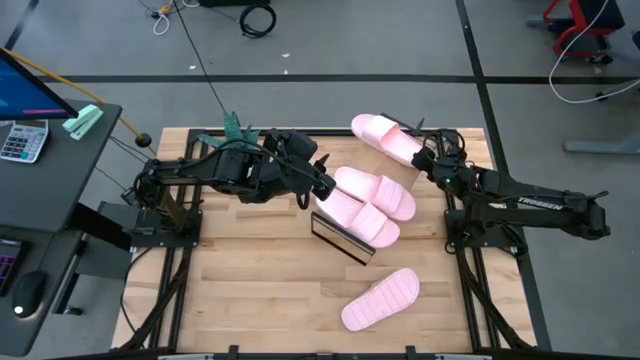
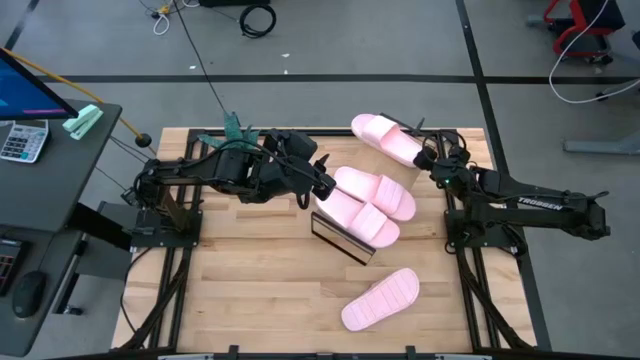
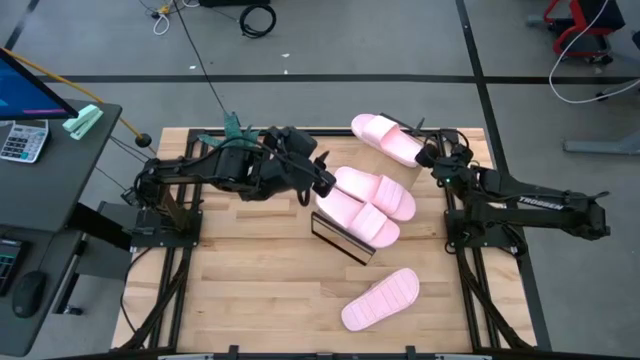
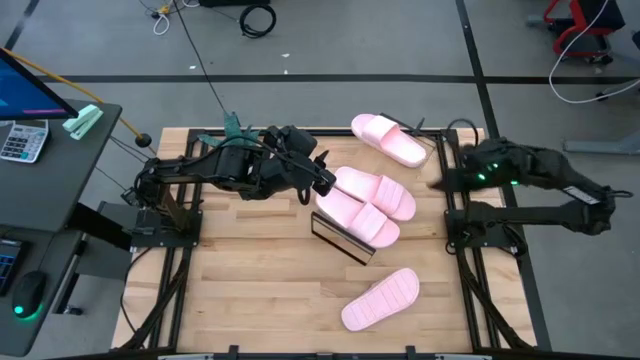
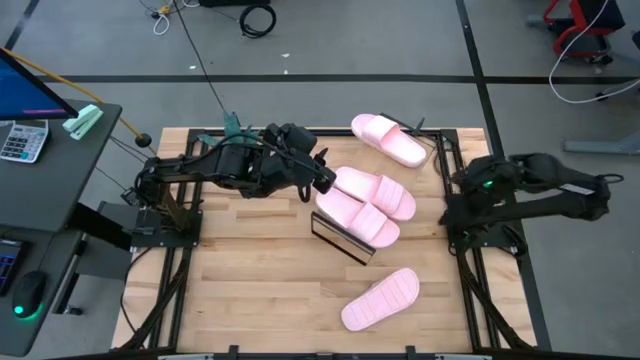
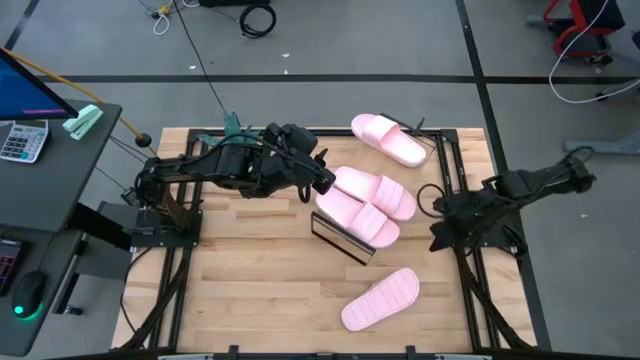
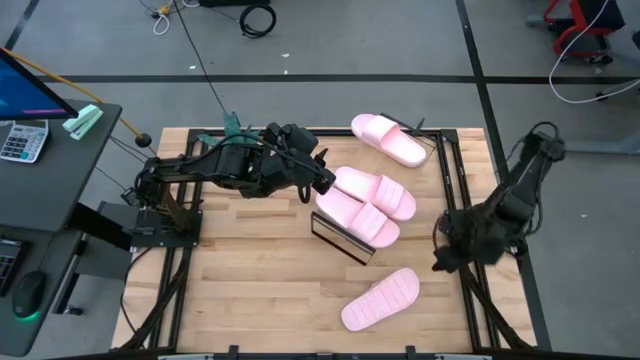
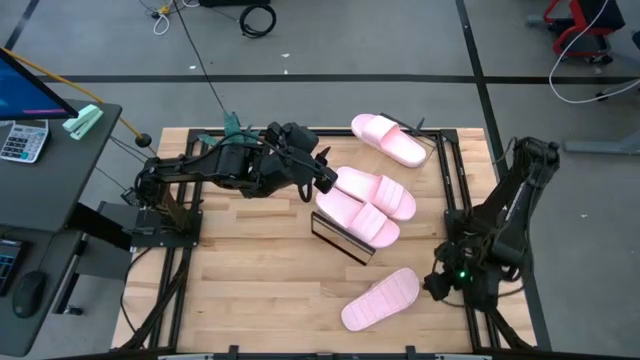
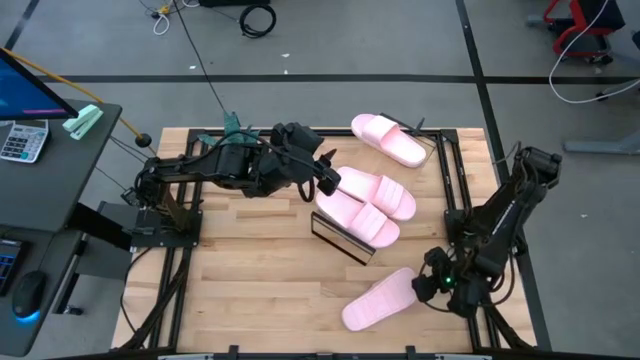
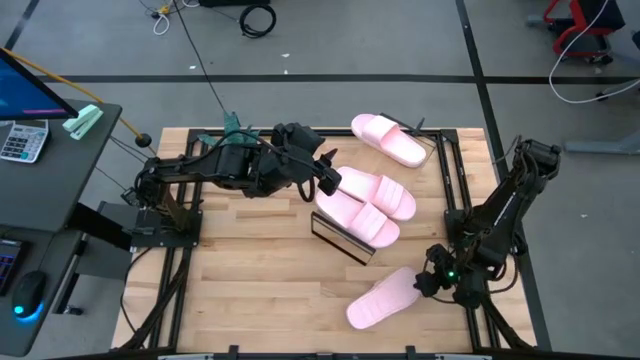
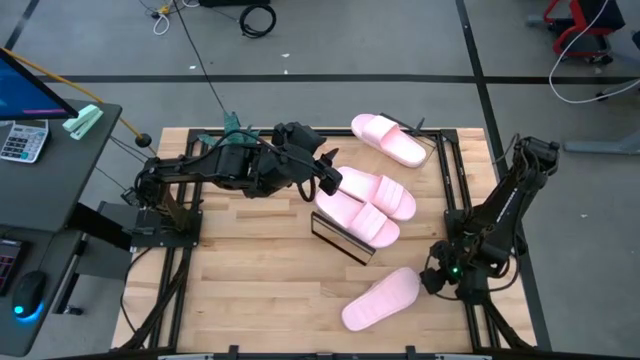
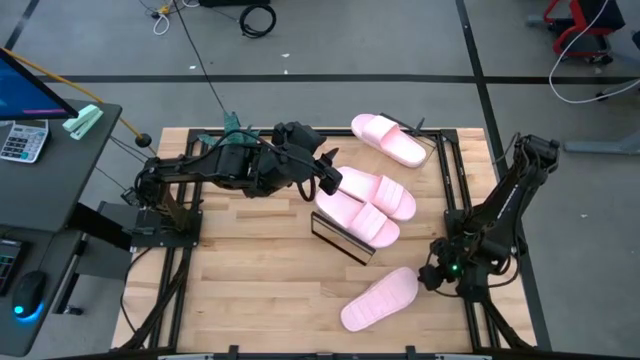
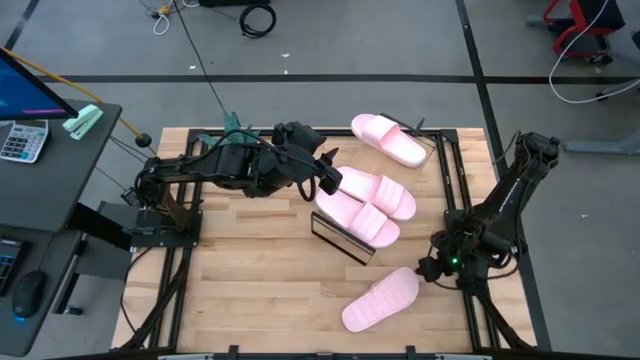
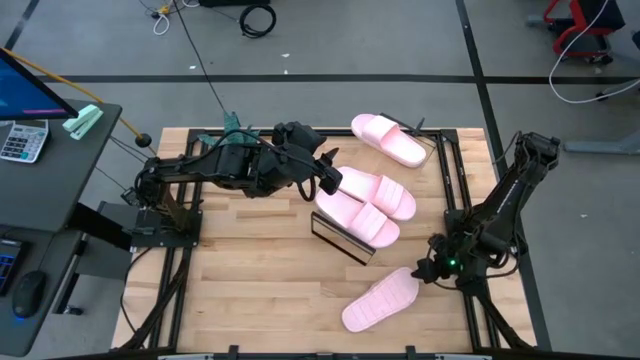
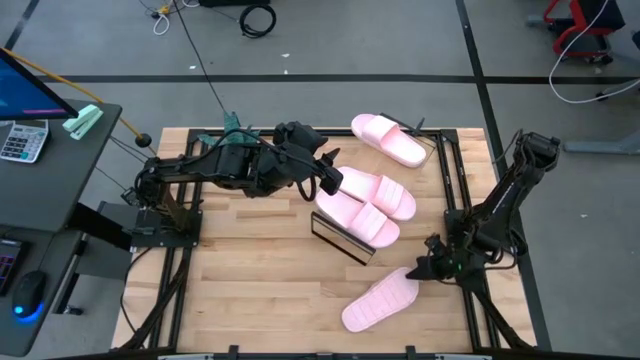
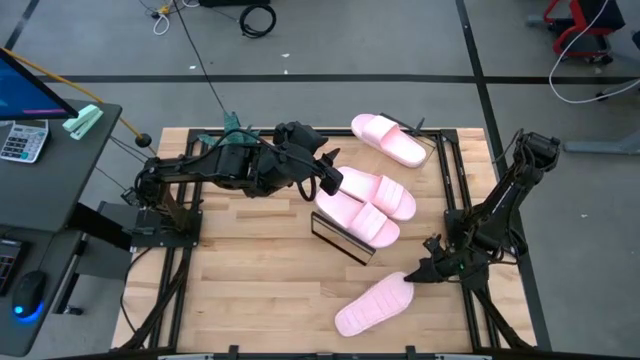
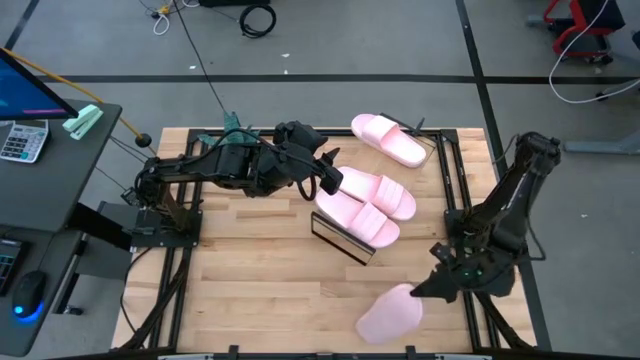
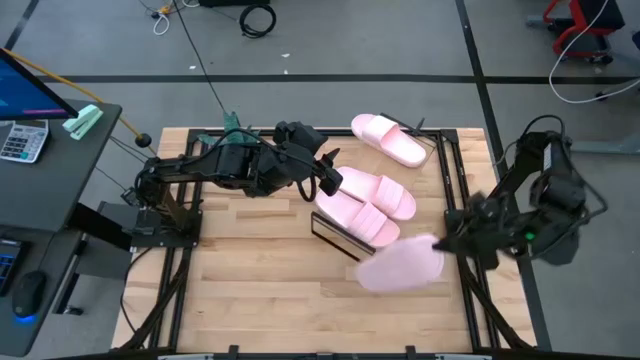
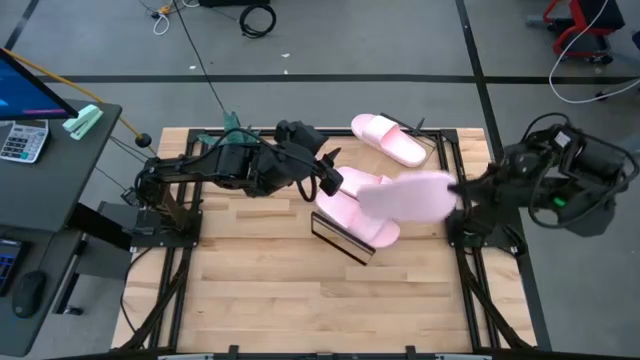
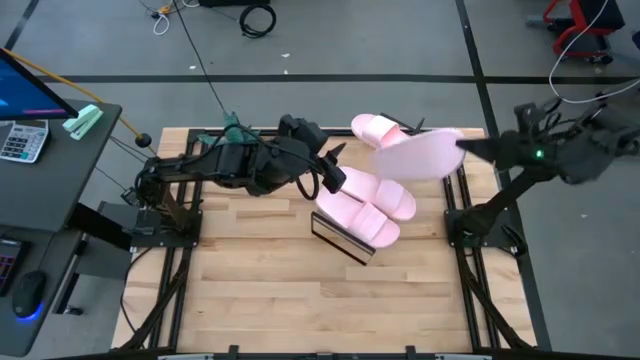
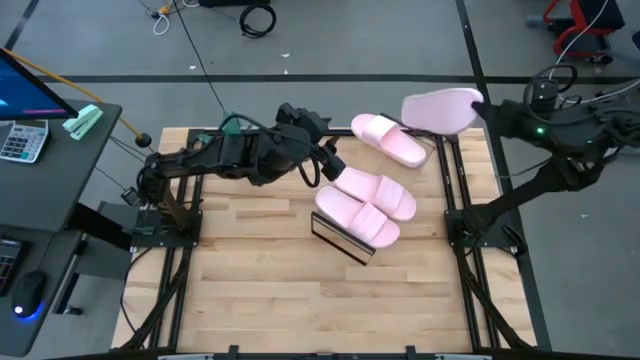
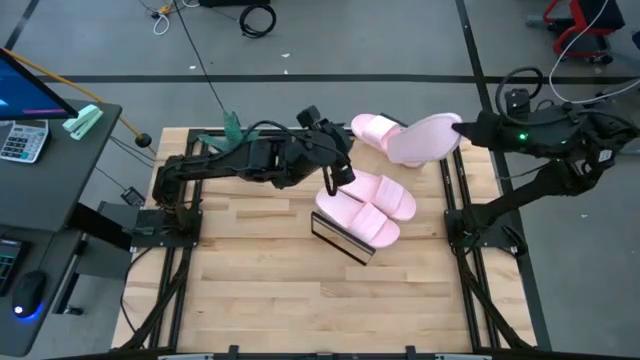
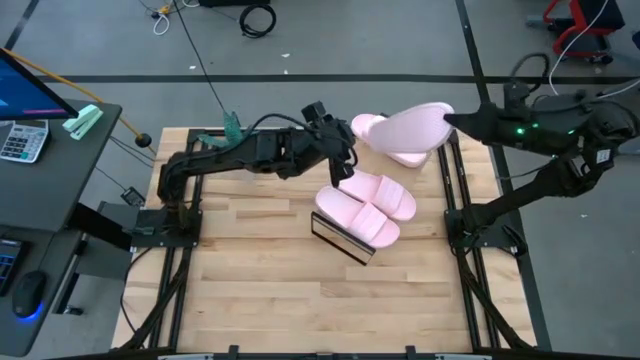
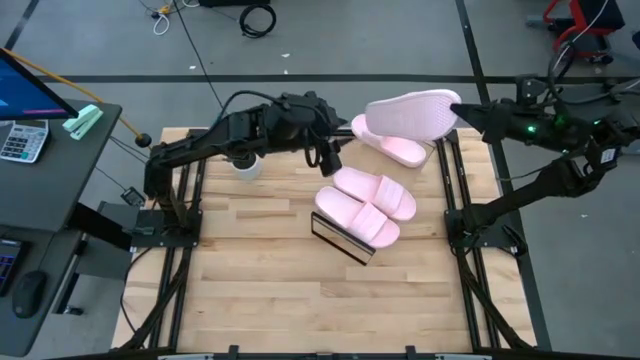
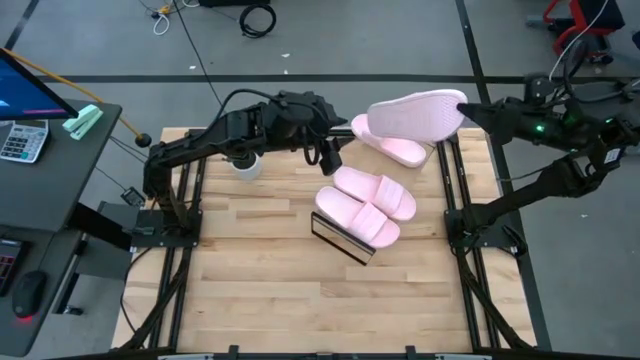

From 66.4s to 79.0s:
Task: Pick and place slides into the shelf
Put the pink slide on the shelf

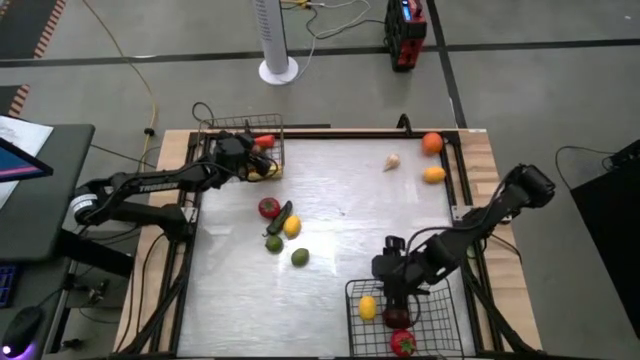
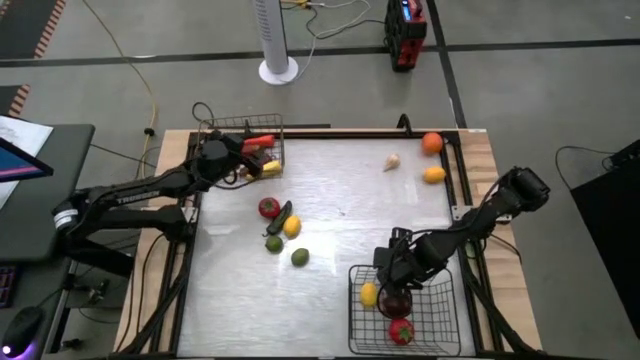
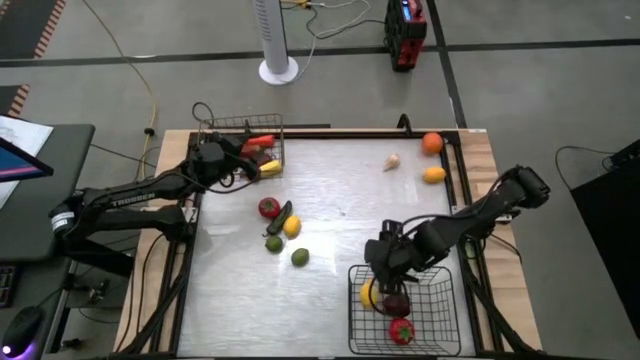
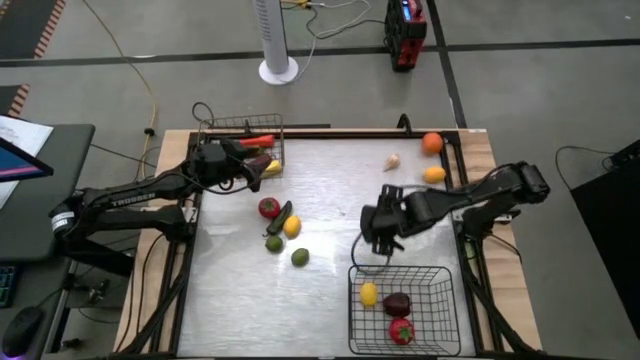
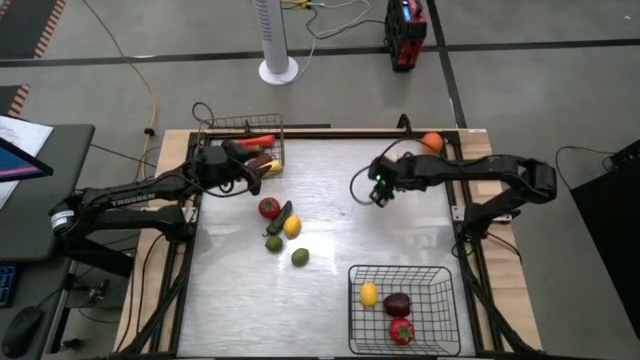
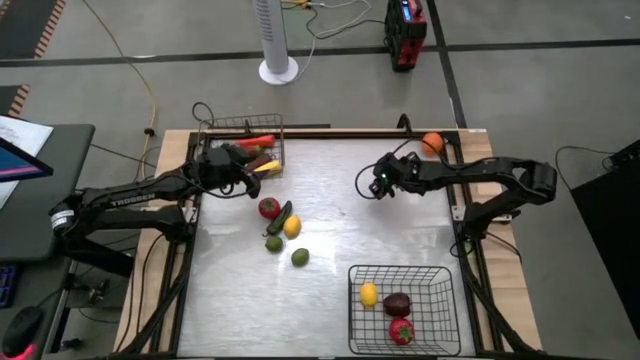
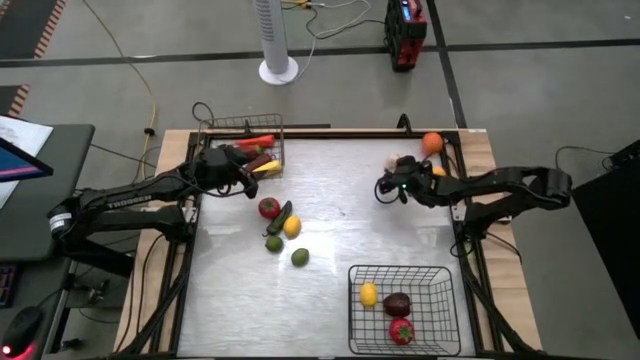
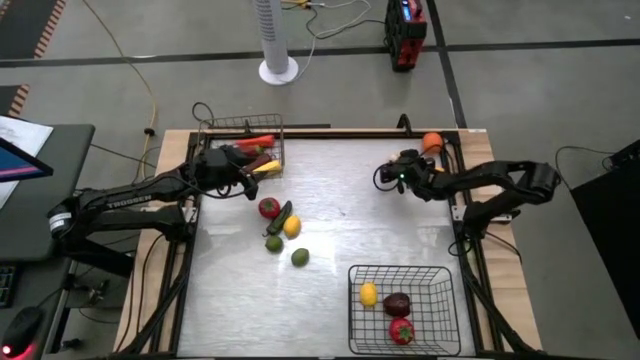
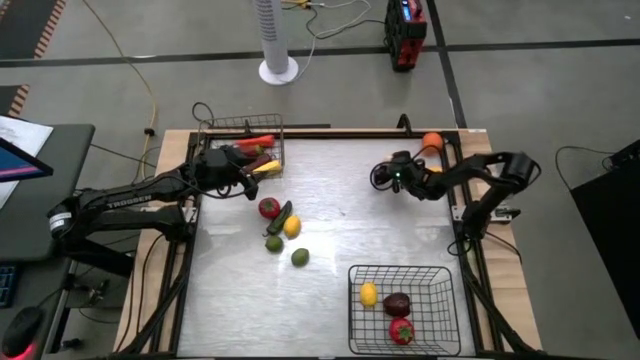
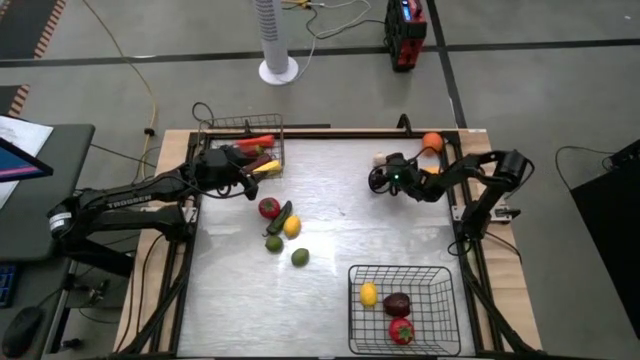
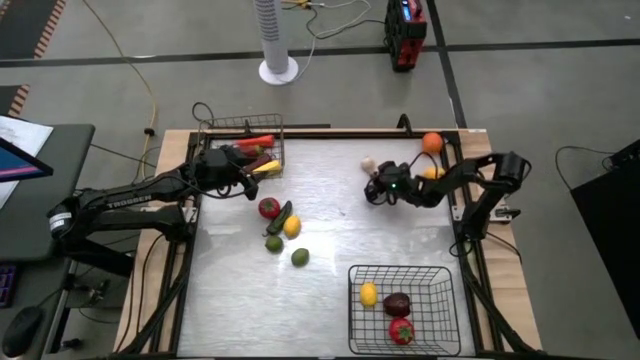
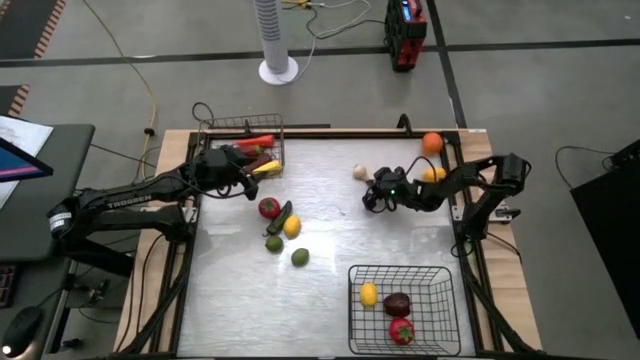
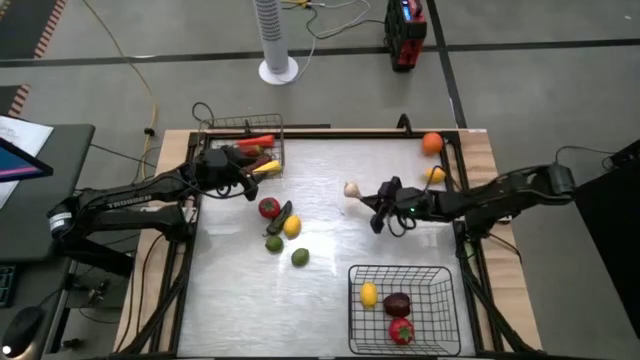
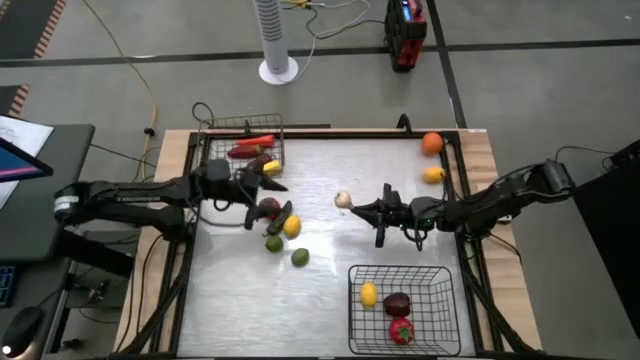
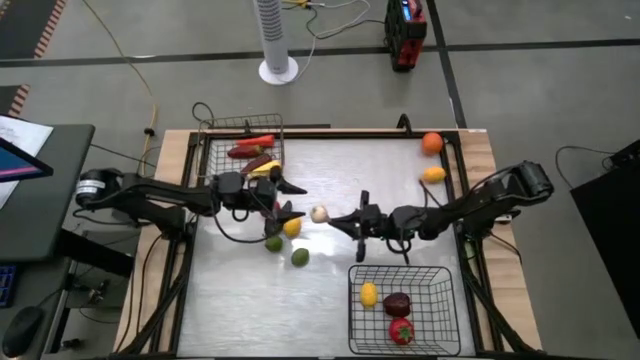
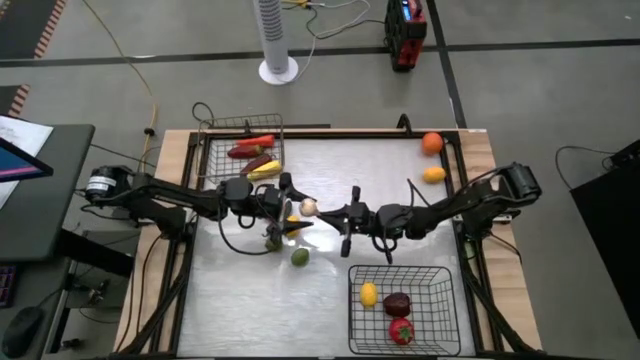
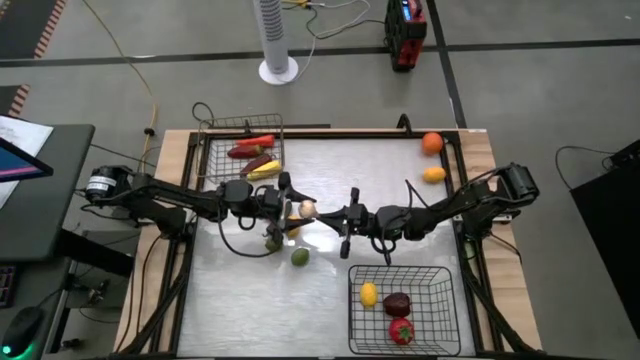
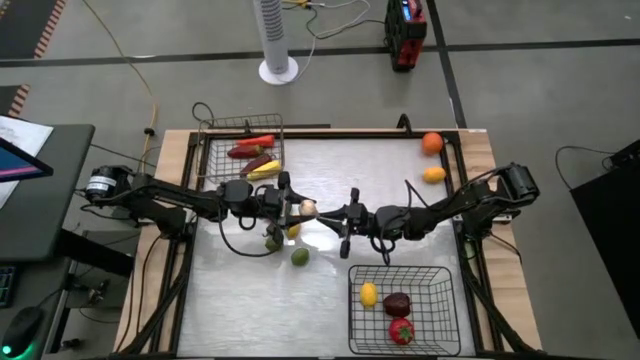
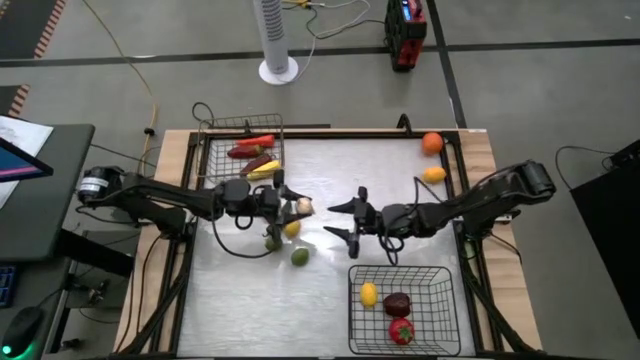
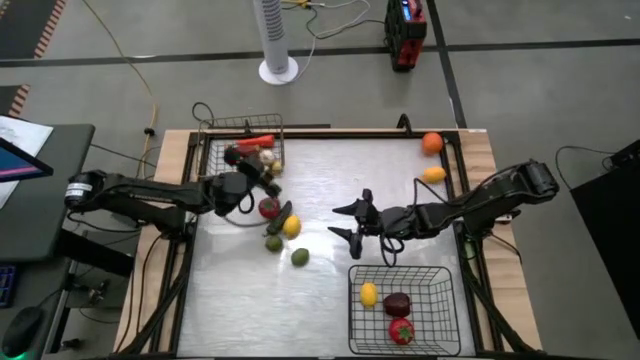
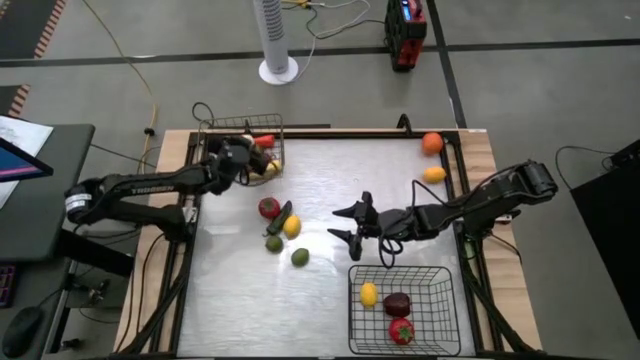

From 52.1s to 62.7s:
Task: Sort produce into baskets
Put the garlic into the top wire basket
